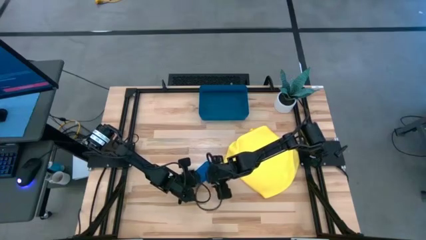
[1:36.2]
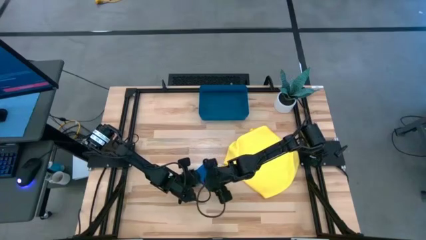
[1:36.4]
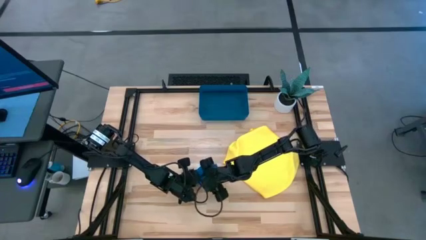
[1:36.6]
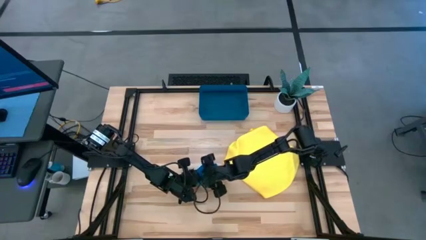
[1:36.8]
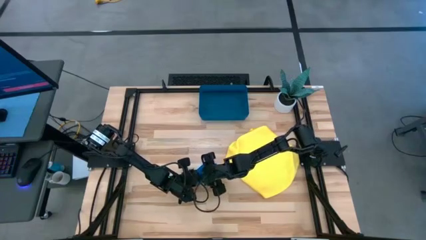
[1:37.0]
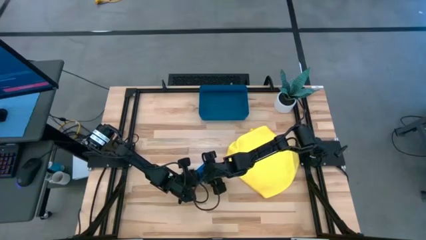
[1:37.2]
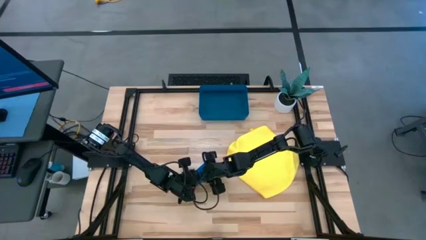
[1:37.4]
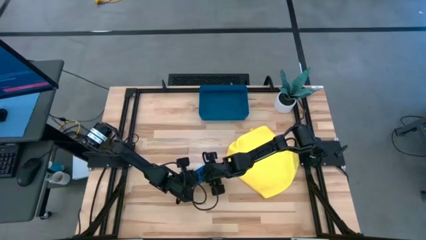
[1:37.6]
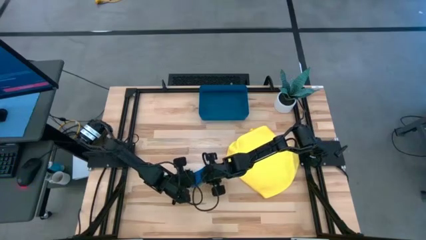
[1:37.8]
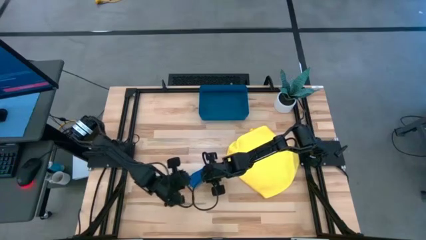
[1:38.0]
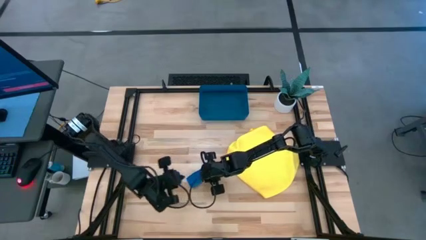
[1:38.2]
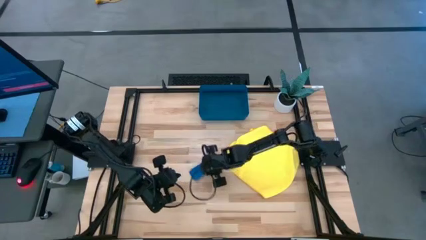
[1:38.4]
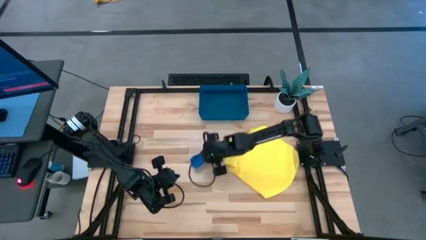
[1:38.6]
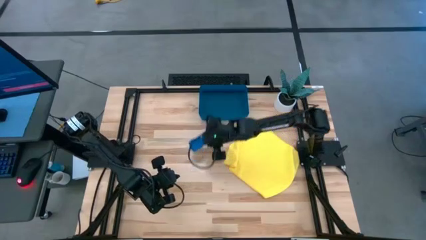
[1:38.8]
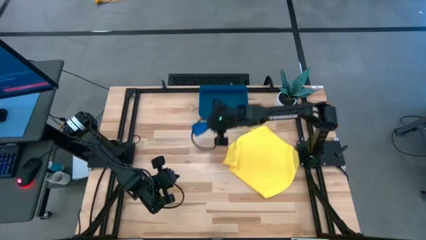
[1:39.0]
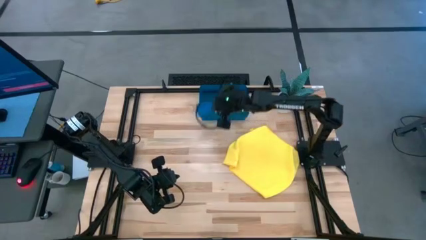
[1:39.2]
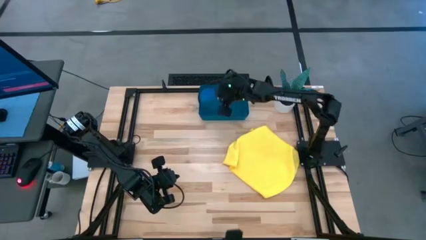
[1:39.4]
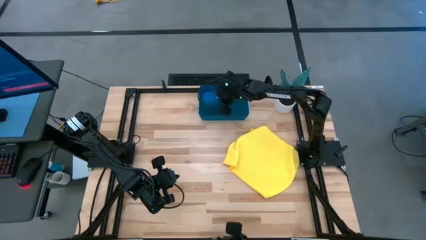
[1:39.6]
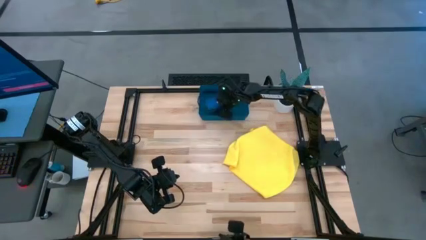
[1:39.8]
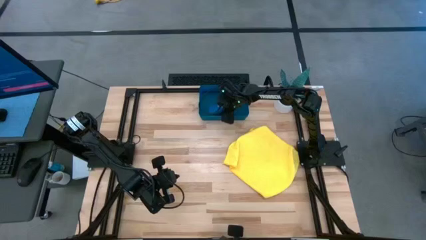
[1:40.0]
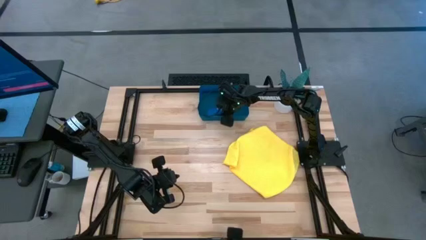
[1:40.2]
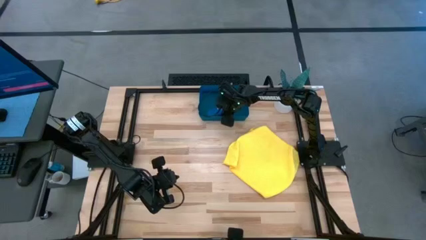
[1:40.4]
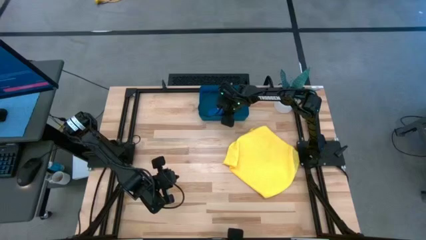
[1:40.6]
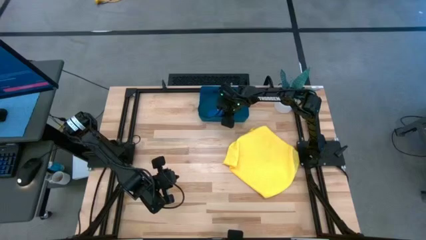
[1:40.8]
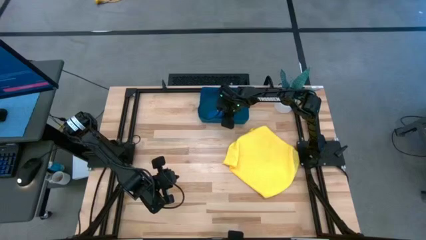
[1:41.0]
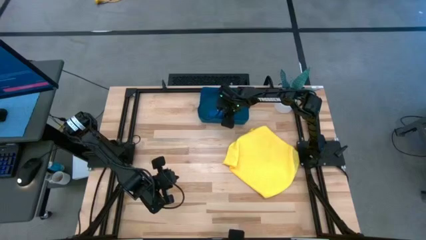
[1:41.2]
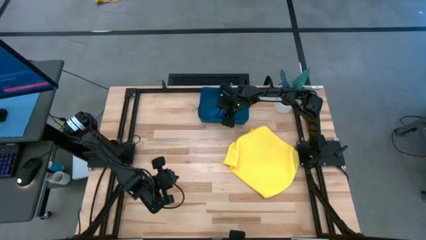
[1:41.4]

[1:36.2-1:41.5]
Task: Roll microfiber towels into tight, uniform cylinder then place into a basket
Put the blue rolled microfiber cloth into the blue bin

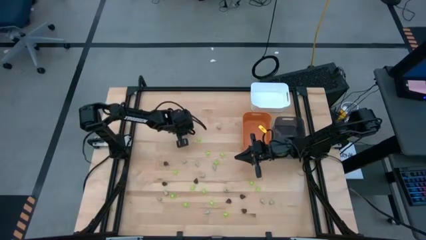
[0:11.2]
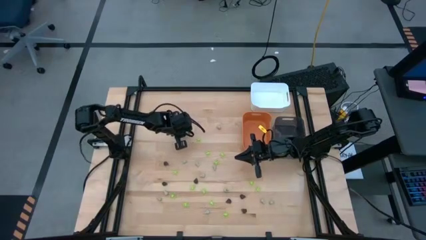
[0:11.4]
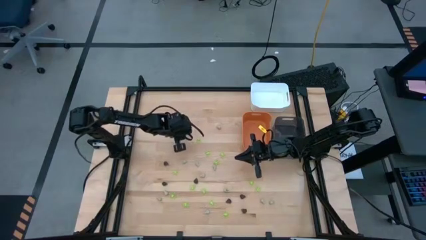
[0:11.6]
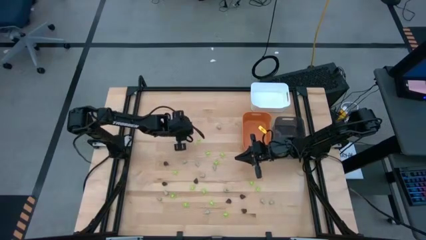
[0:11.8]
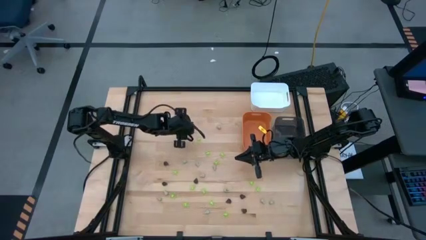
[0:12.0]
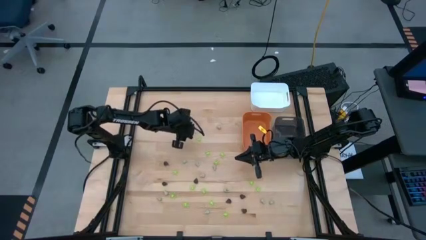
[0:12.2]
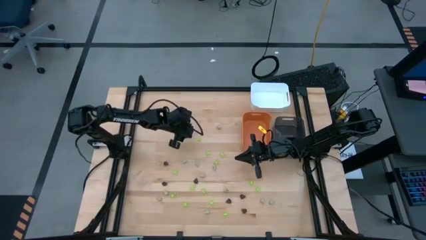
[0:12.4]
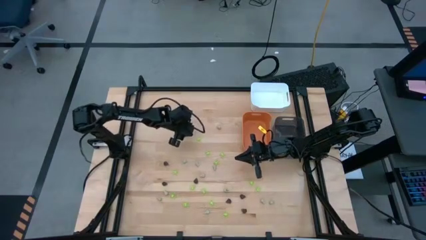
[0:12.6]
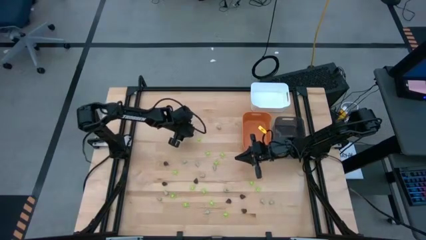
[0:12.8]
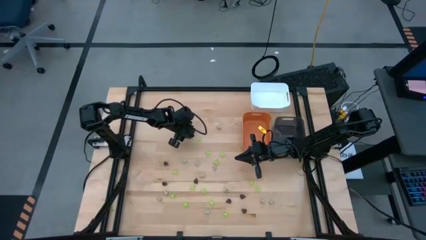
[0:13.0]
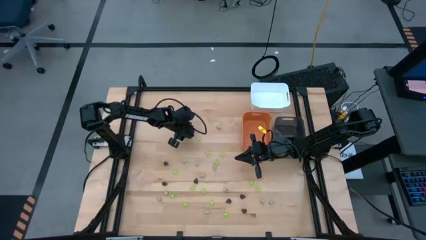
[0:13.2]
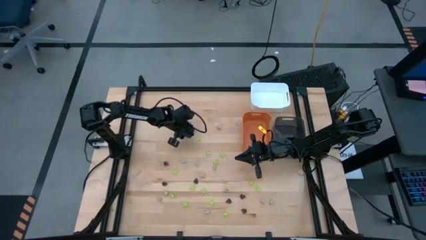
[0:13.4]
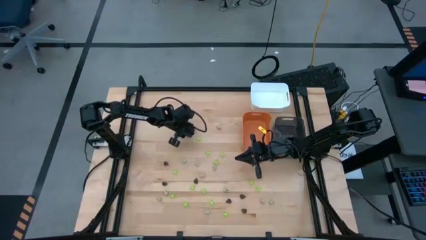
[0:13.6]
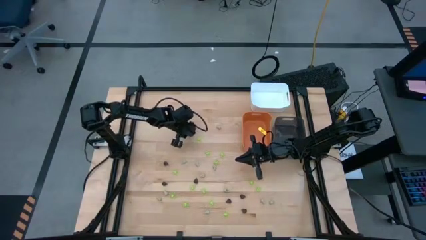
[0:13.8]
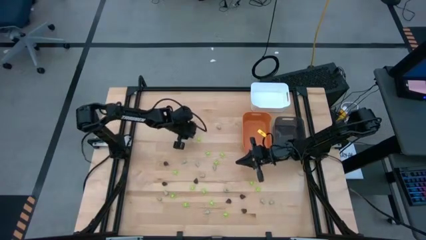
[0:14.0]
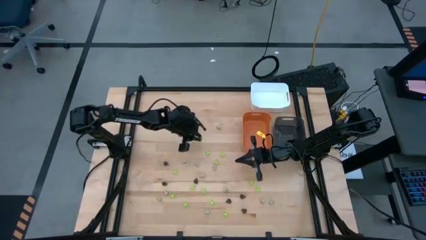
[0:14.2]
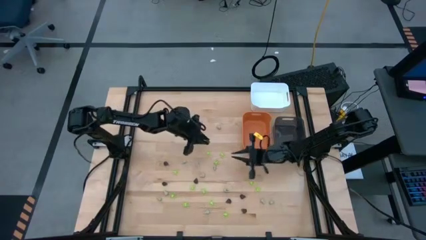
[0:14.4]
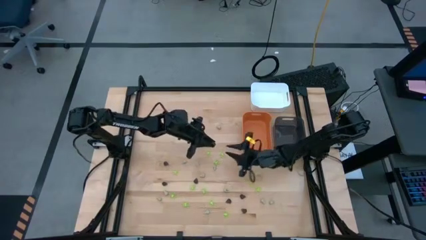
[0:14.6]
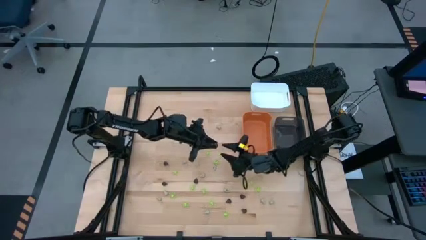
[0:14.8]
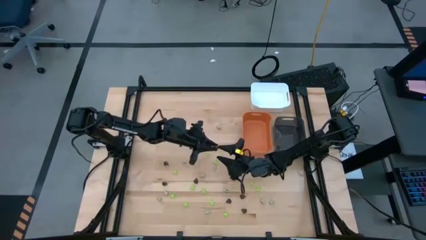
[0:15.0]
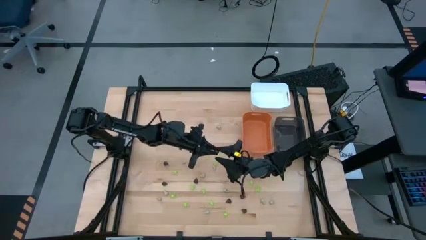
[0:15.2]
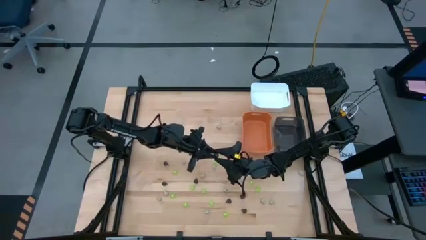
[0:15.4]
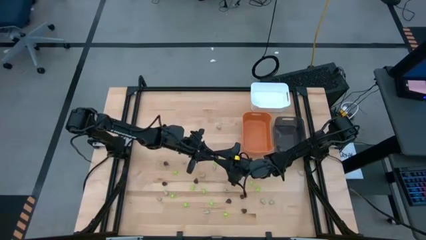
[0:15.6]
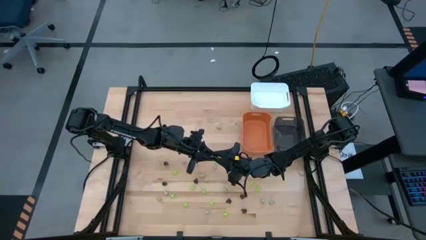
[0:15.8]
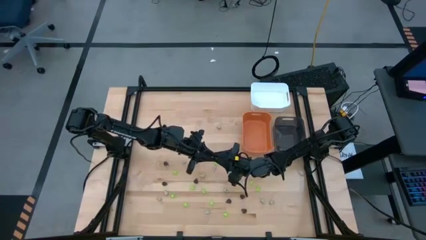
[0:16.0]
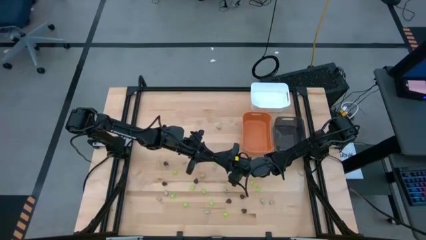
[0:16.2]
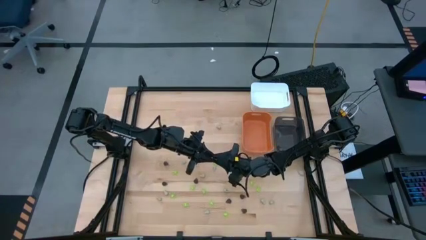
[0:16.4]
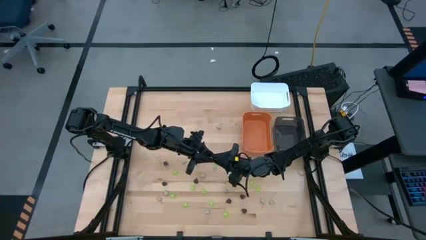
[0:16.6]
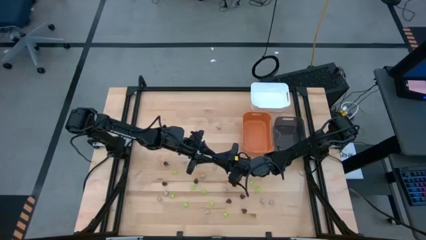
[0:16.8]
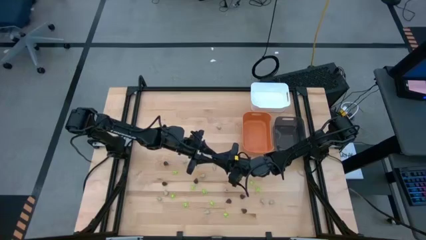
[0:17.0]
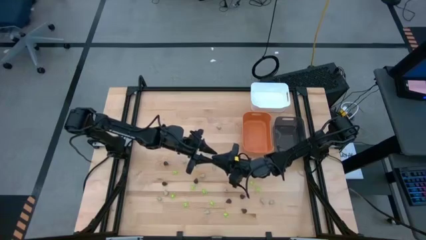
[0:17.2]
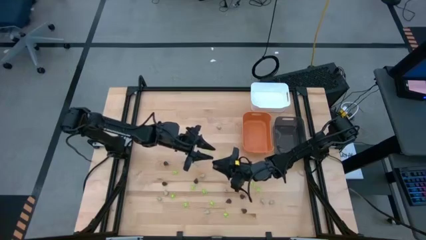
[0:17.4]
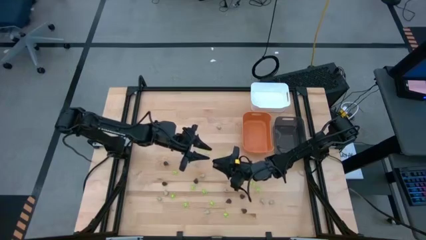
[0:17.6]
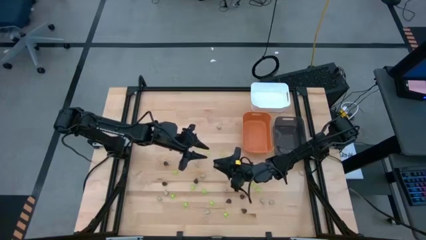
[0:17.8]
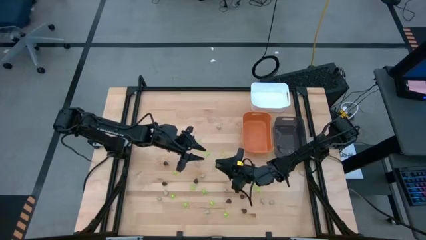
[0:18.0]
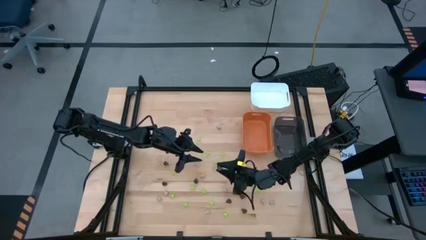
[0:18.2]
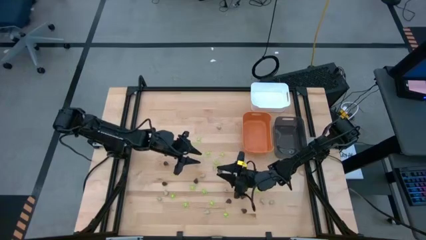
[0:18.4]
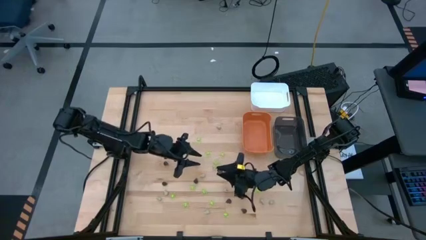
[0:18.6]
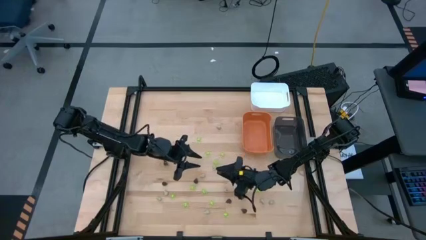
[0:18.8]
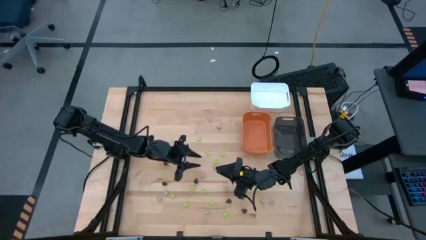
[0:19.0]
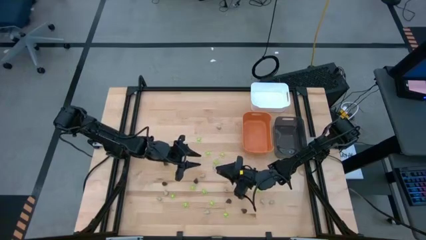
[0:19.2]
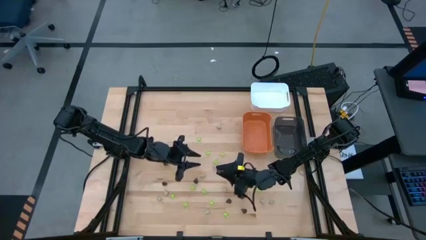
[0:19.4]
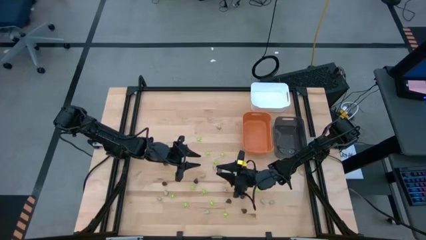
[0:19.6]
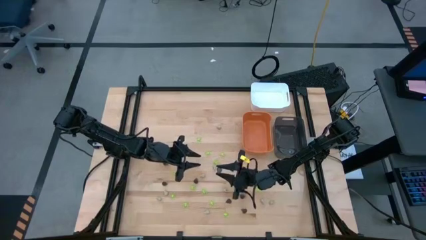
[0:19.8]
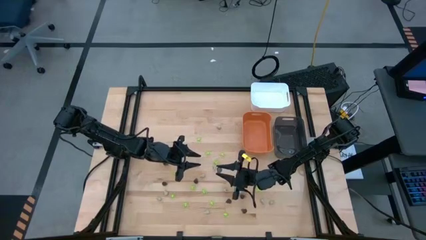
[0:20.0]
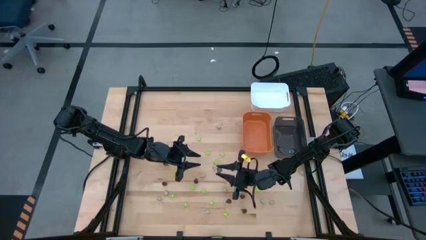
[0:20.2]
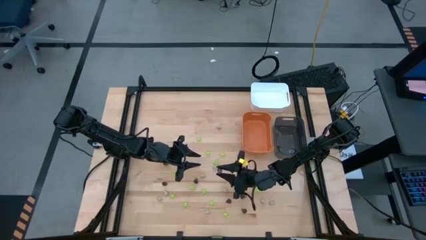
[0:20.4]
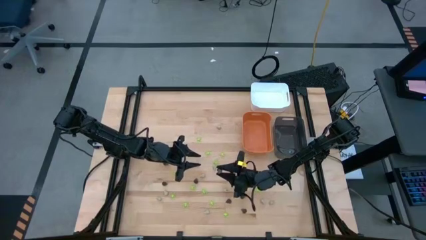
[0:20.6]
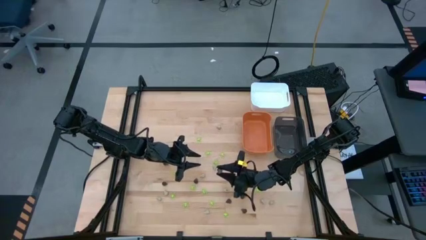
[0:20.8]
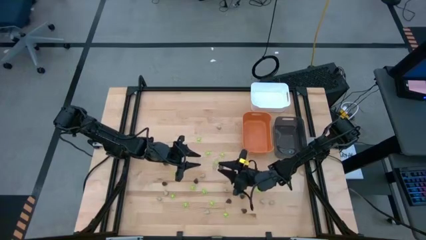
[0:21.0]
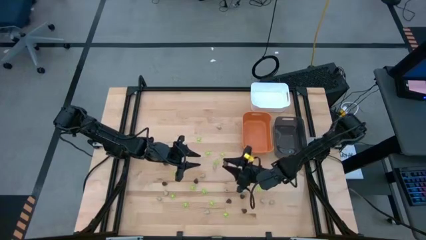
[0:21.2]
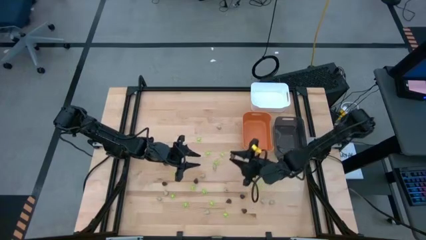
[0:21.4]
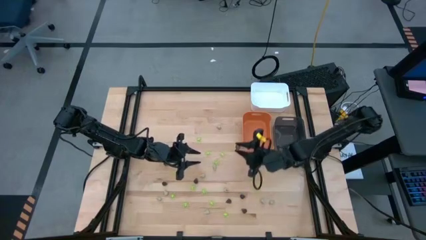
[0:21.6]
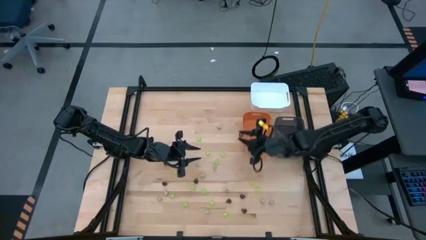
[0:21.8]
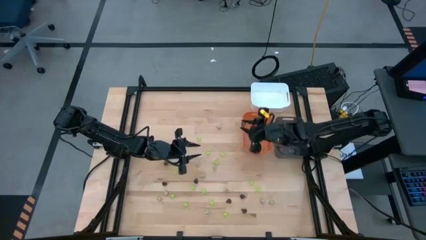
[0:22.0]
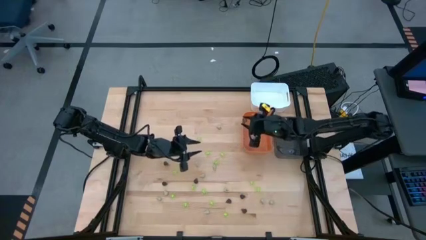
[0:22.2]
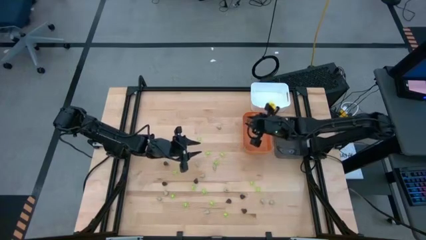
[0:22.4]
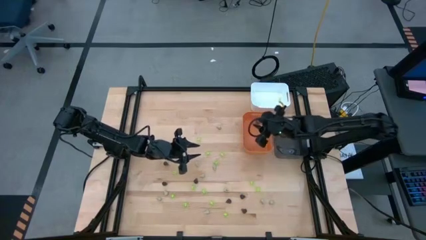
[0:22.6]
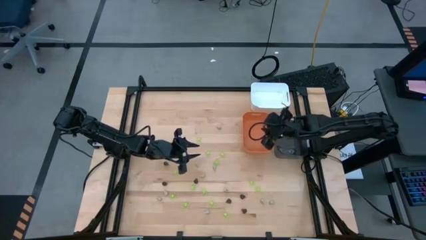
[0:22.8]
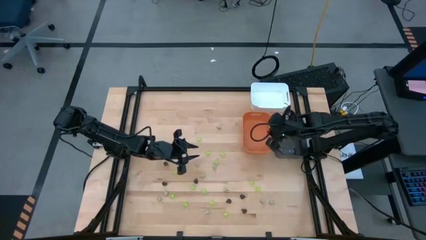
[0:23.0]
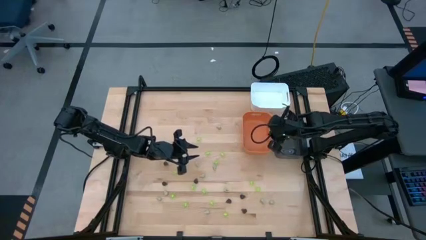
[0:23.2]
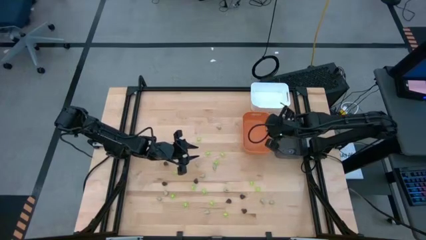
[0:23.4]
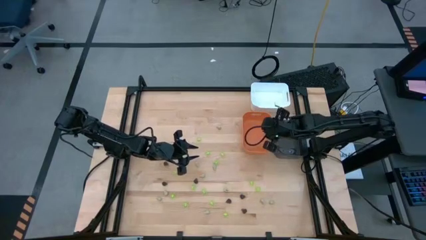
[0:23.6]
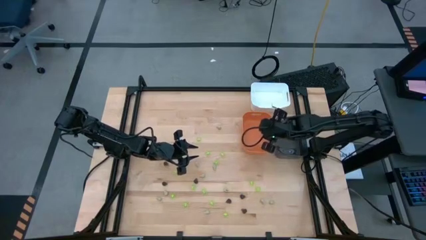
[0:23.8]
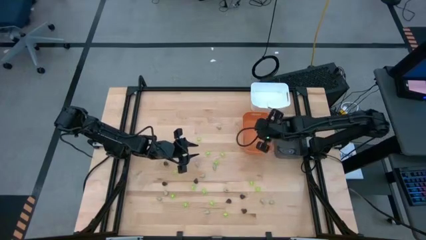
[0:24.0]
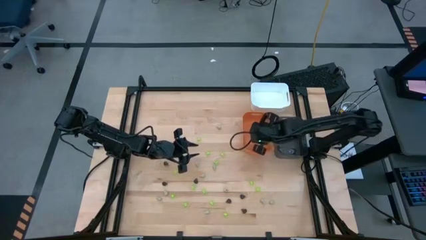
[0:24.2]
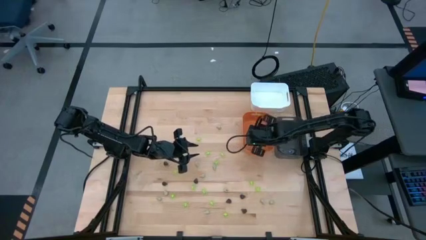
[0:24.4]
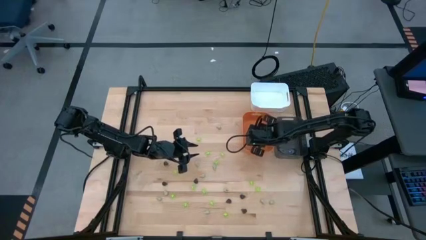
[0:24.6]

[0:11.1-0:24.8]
Task: Sort Halloween decoration
Put the black skull toy into the orange bin
